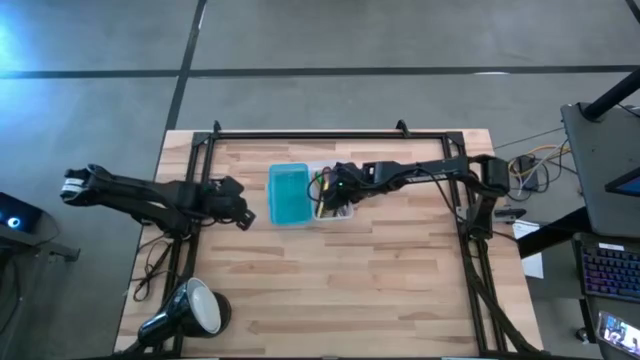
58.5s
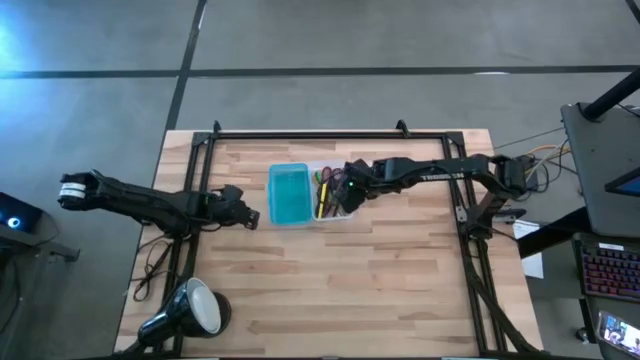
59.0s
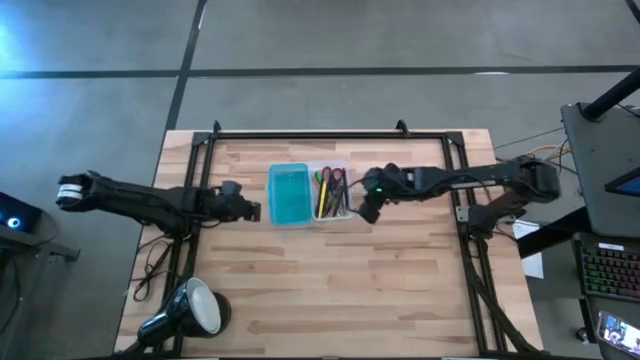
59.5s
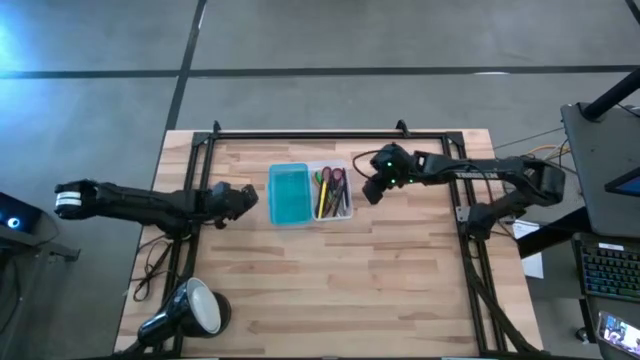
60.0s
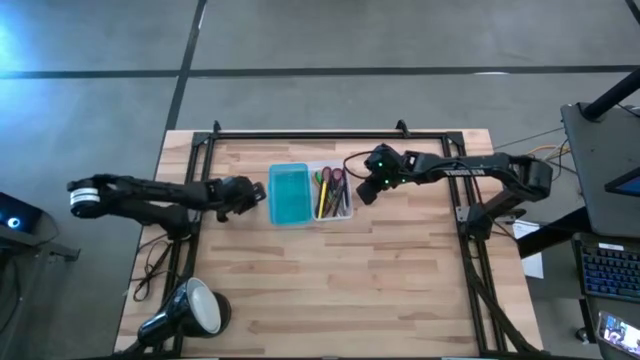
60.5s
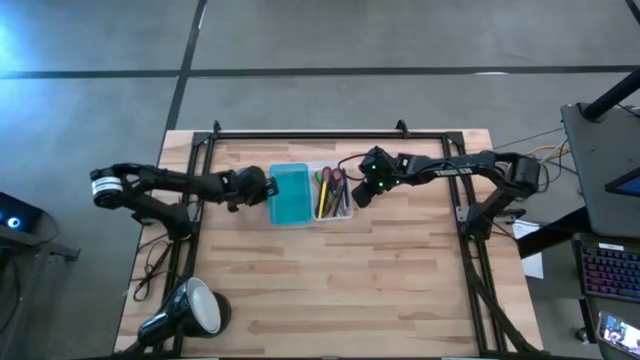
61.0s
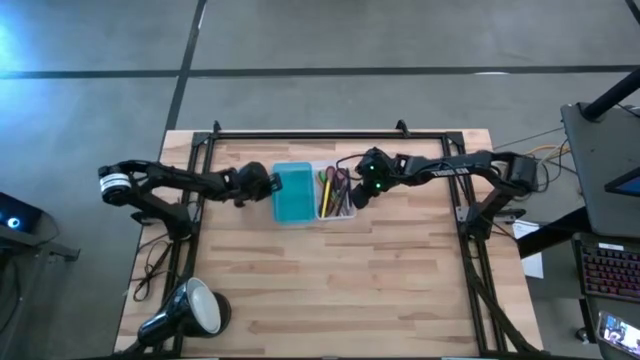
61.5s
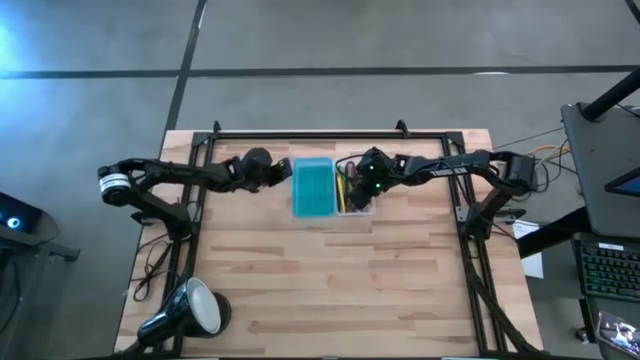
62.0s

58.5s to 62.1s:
Task: Pick & place school supplies into a supply box
Close the blue supply box

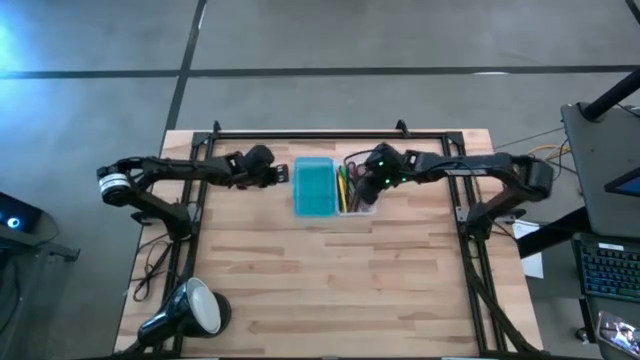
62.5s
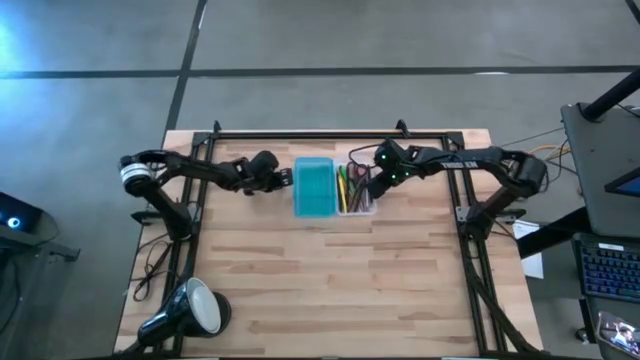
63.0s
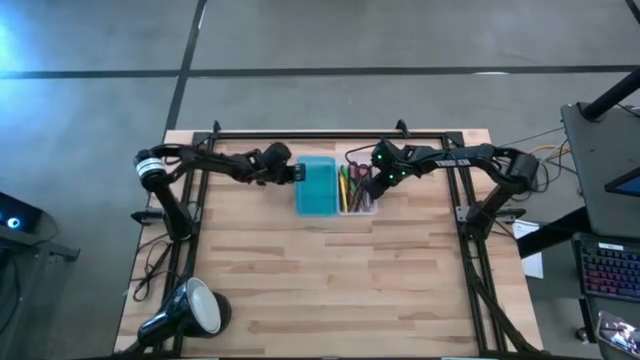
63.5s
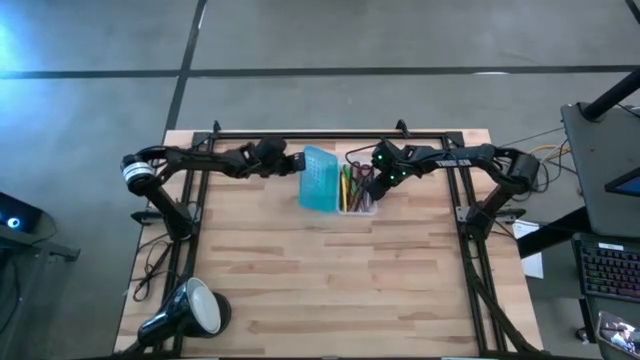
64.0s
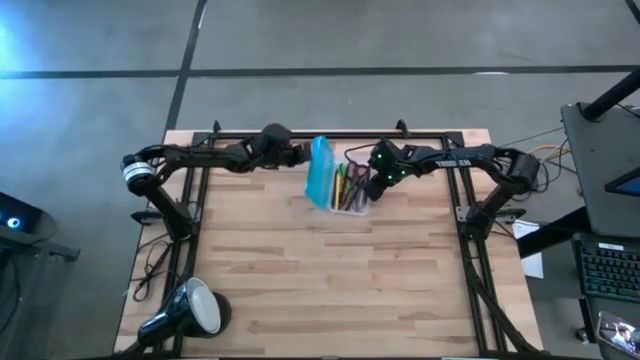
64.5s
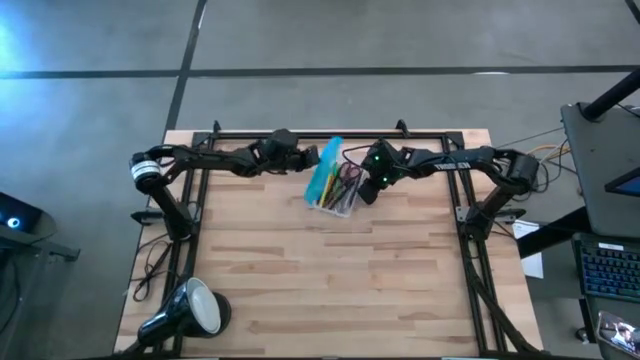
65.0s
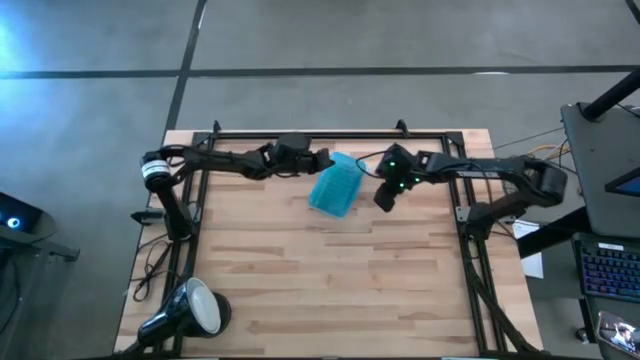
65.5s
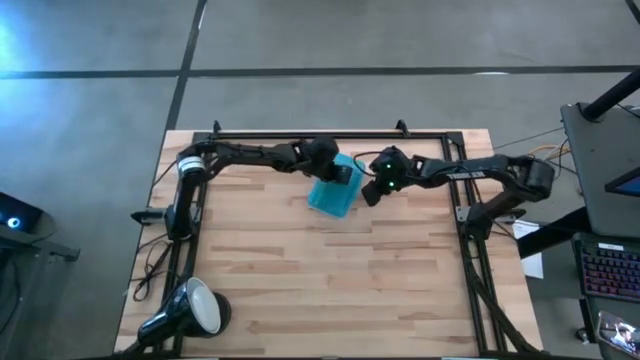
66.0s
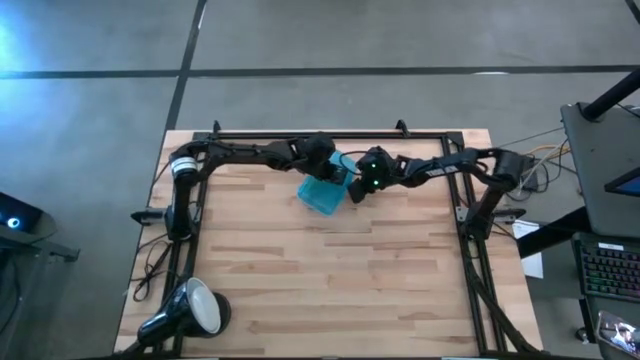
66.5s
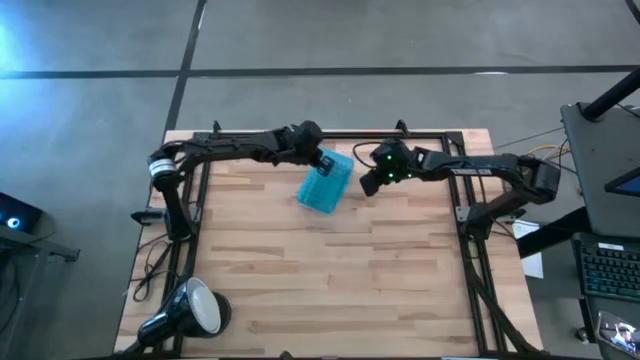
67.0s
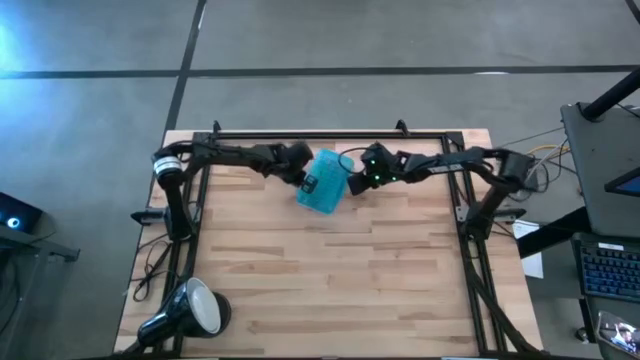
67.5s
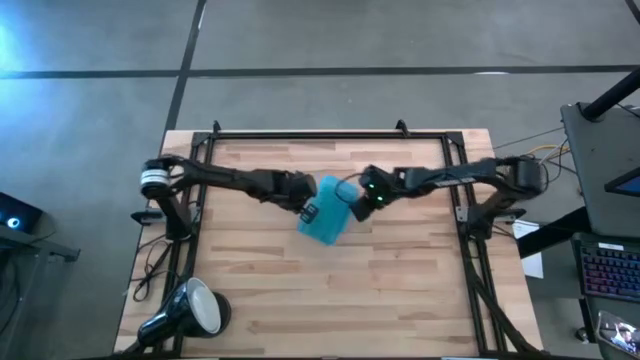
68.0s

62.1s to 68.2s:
Close the blue supply box

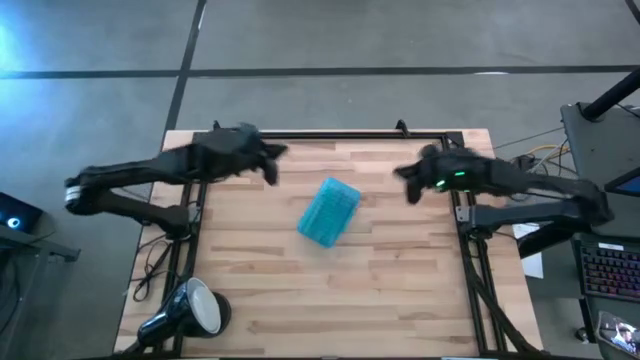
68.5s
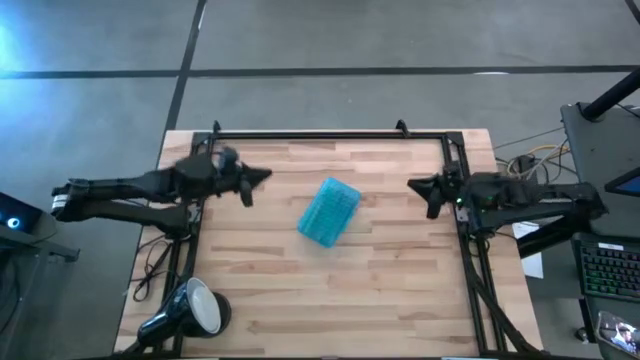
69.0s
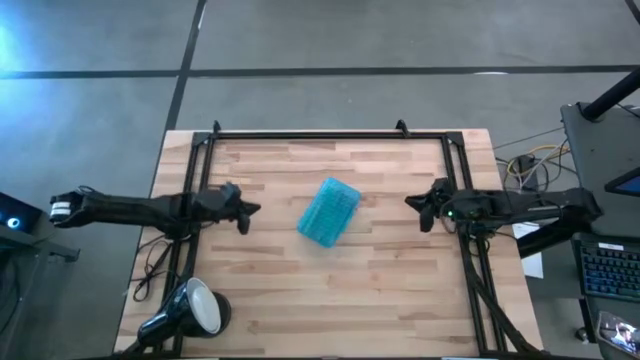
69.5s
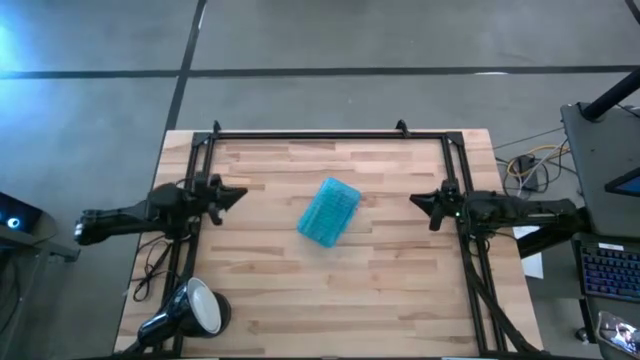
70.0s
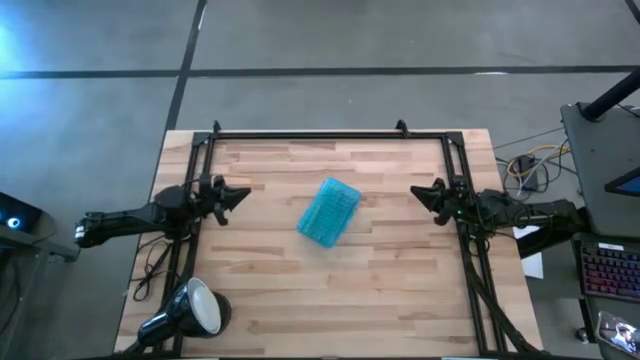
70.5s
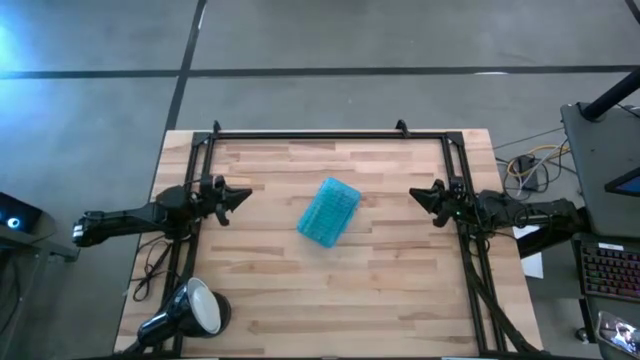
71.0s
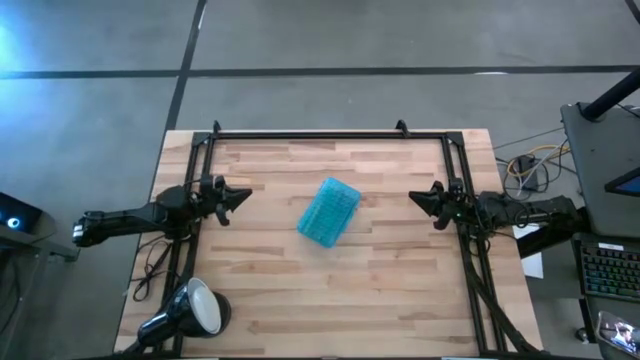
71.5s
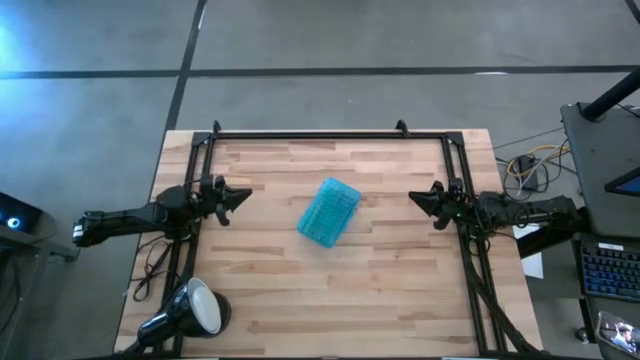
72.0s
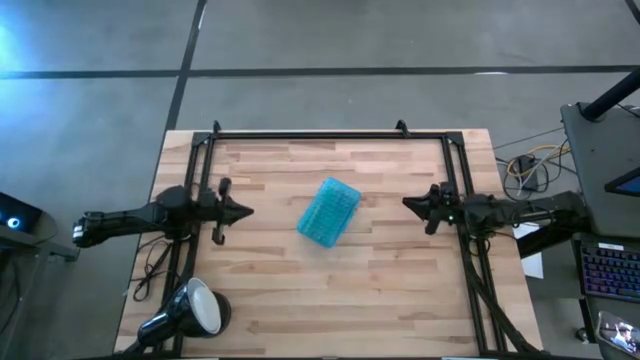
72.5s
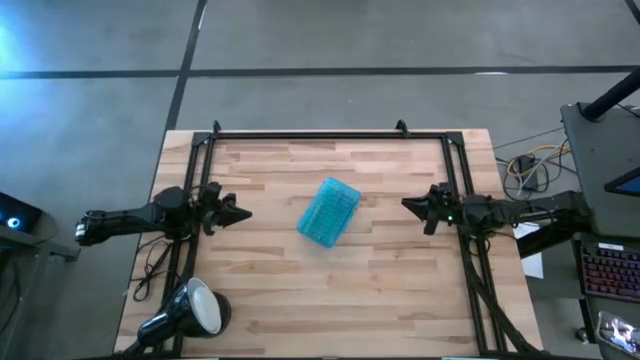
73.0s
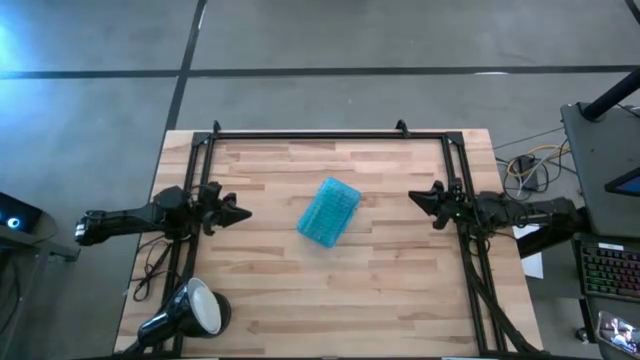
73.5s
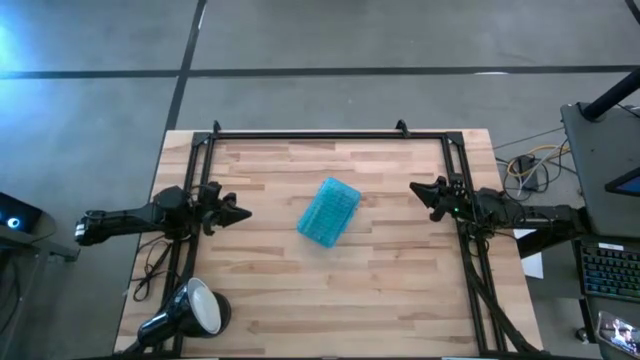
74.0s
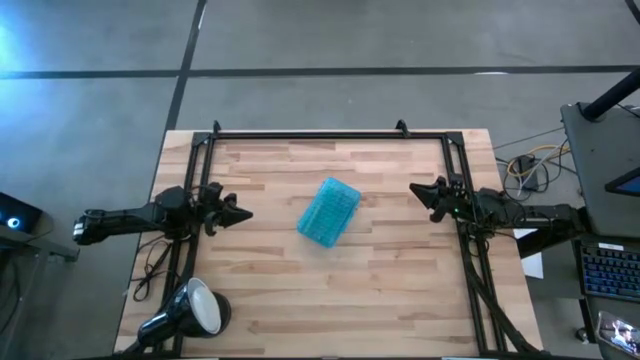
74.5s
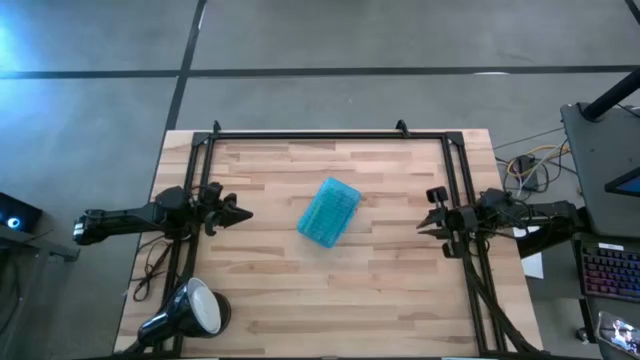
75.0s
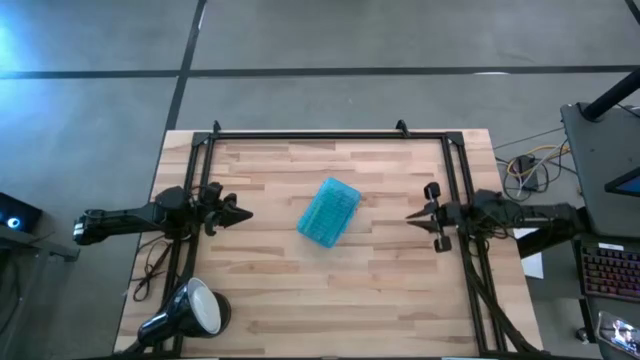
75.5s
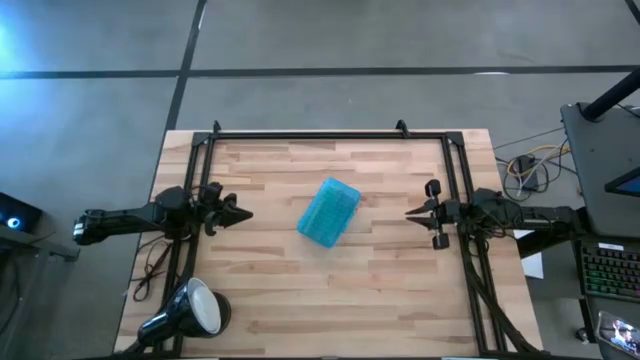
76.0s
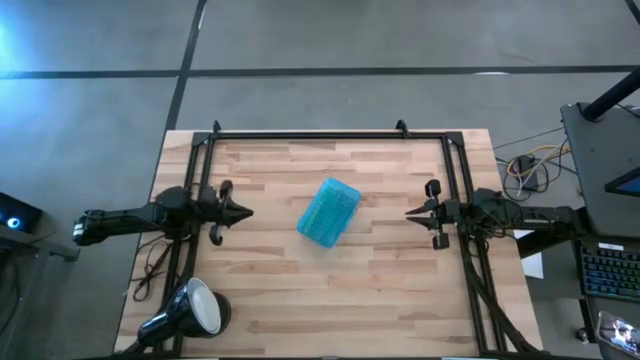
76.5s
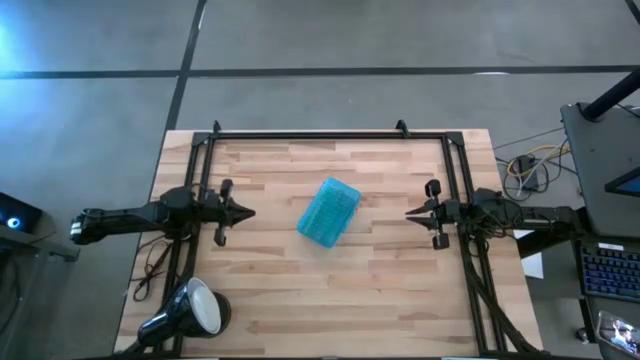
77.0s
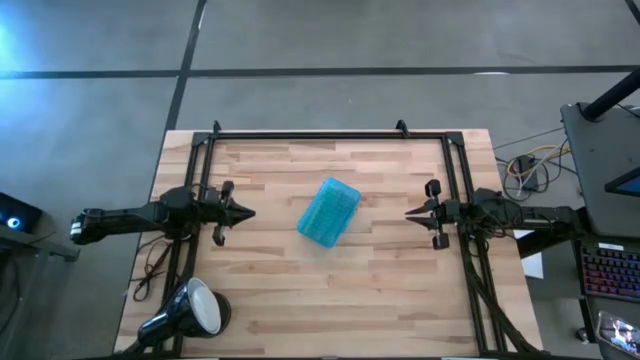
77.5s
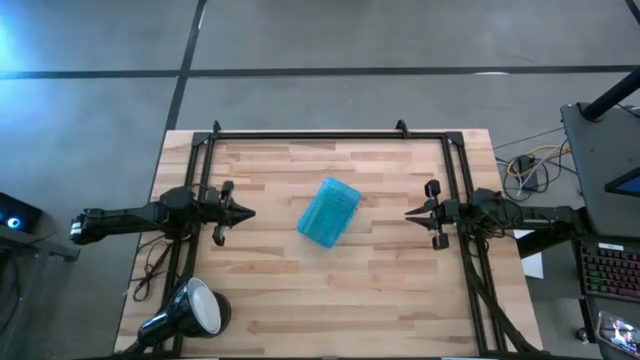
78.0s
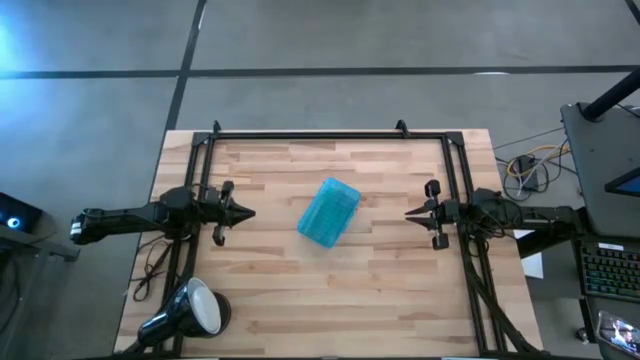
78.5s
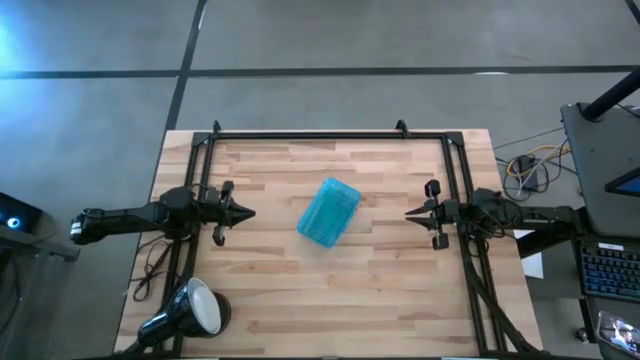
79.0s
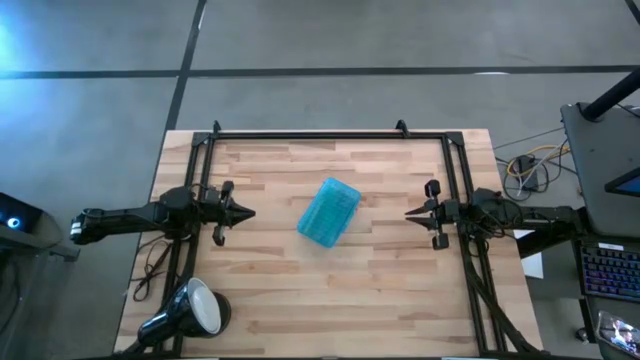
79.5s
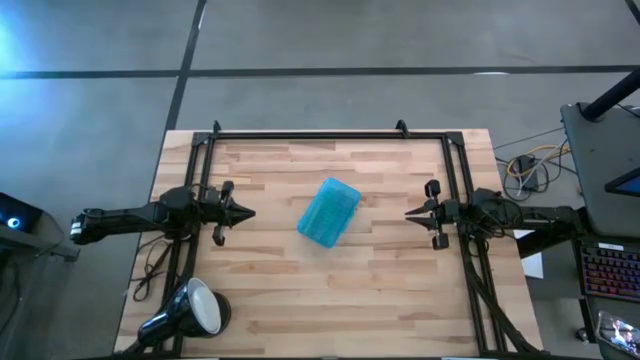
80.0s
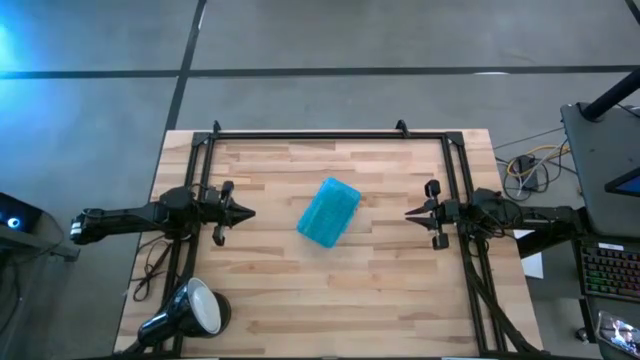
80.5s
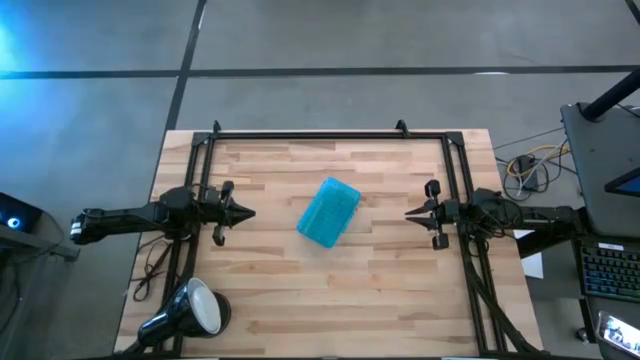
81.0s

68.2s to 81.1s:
Return to Home Position
